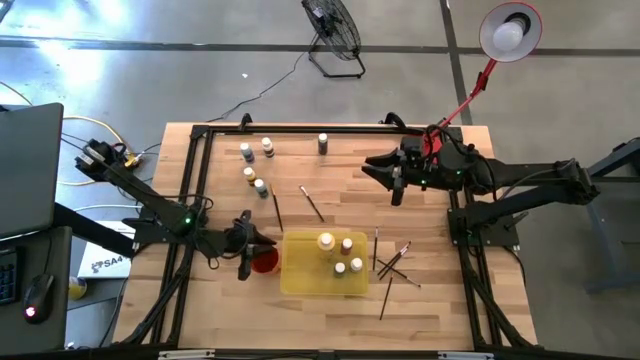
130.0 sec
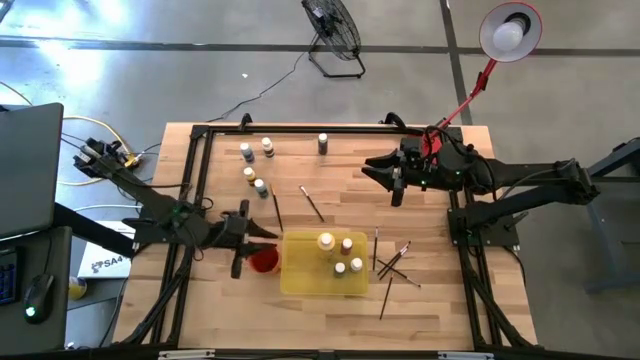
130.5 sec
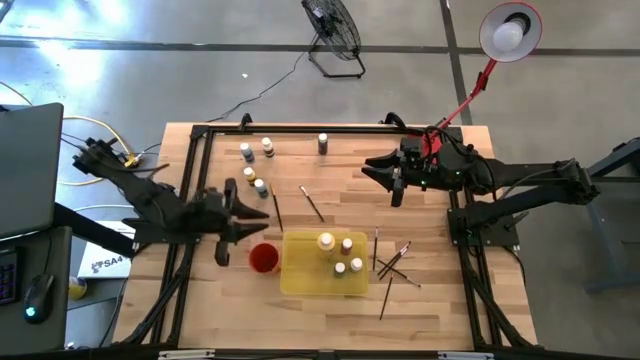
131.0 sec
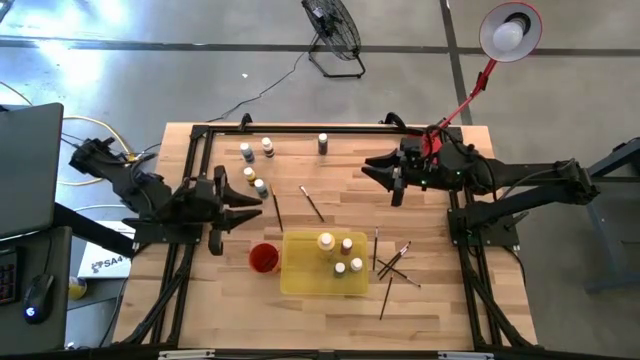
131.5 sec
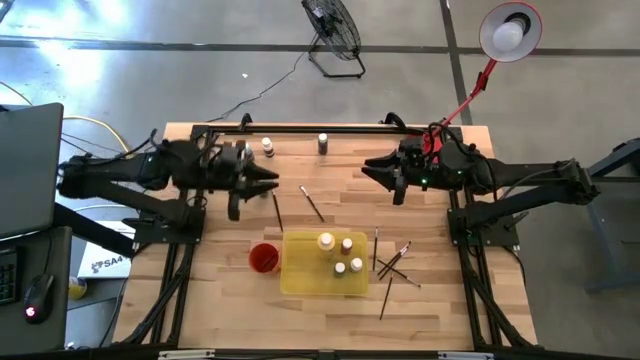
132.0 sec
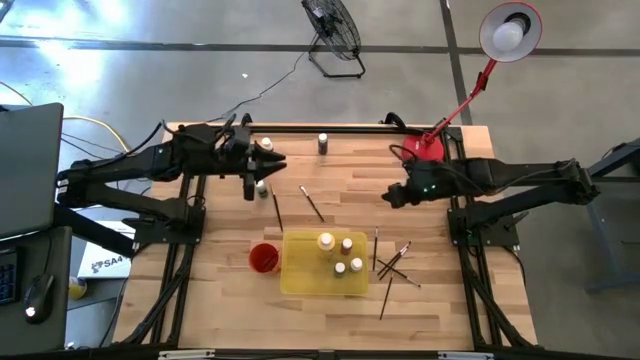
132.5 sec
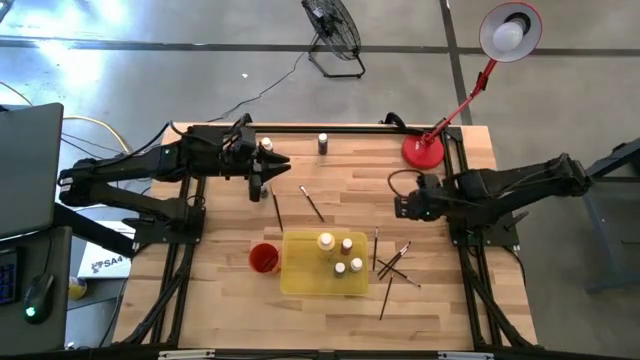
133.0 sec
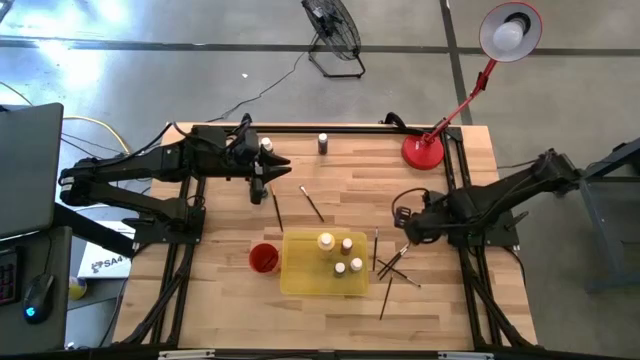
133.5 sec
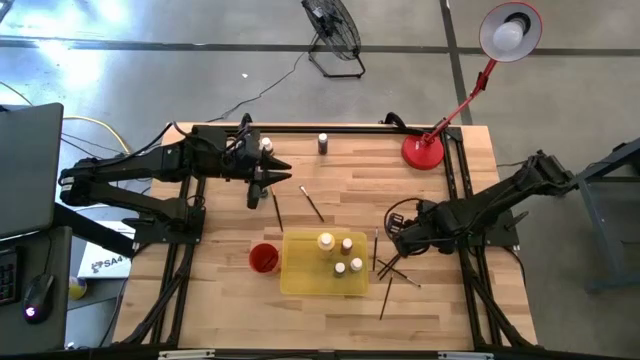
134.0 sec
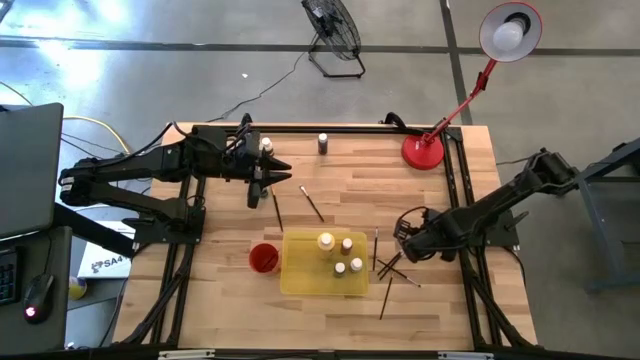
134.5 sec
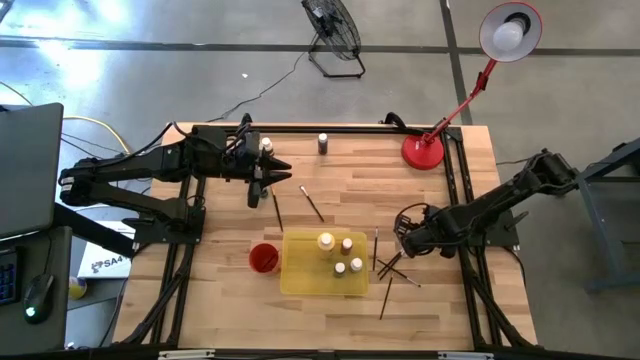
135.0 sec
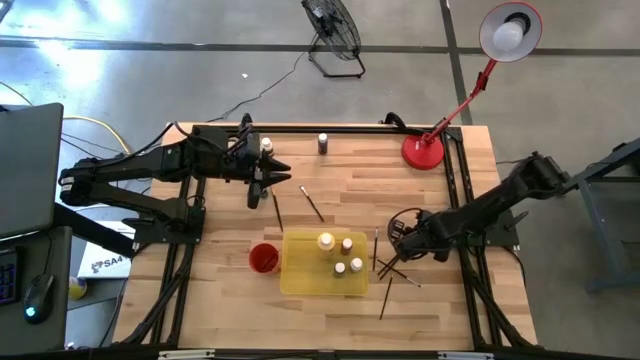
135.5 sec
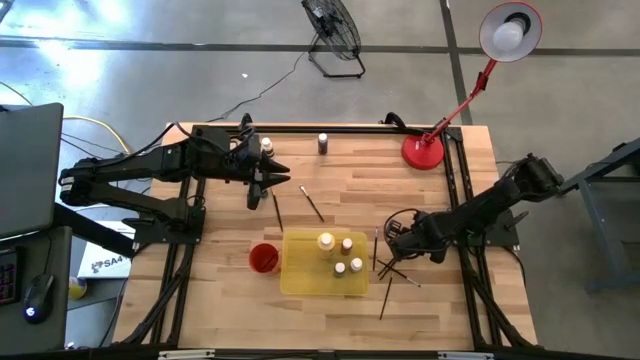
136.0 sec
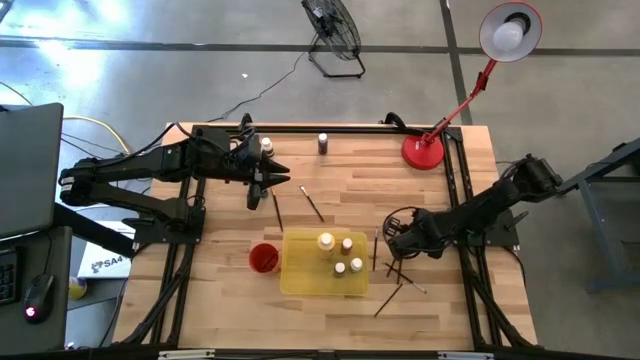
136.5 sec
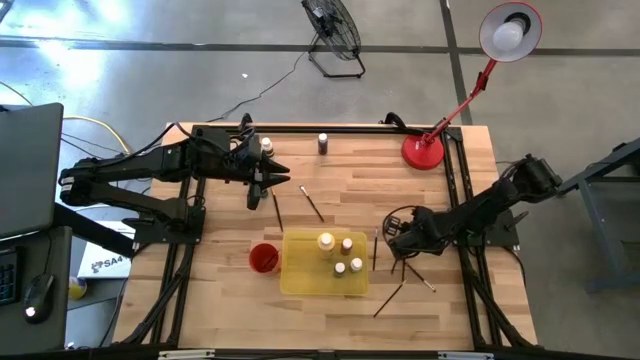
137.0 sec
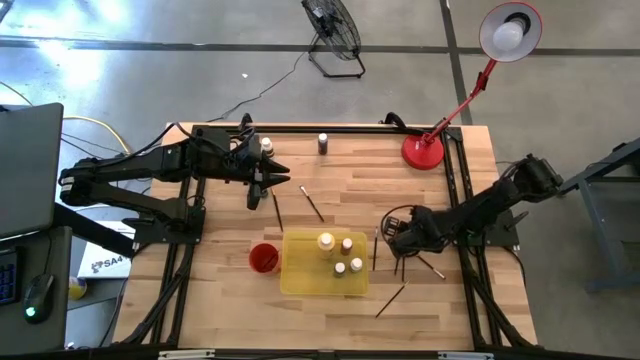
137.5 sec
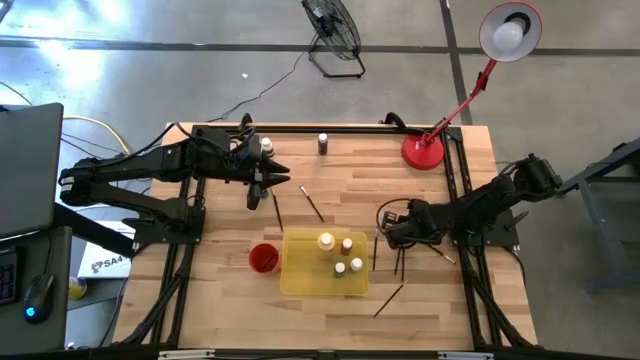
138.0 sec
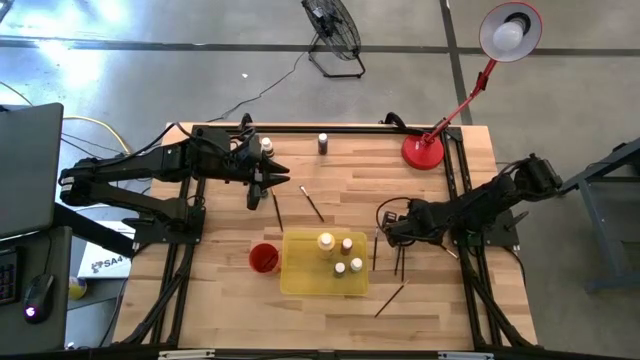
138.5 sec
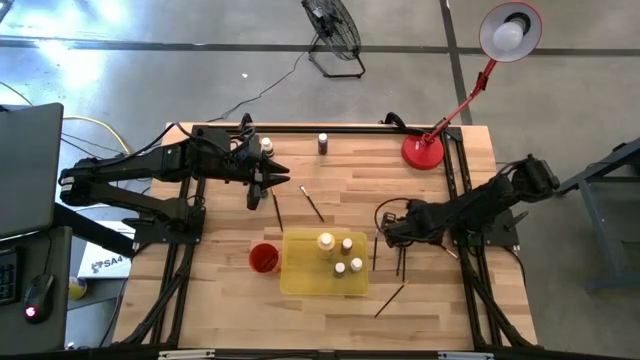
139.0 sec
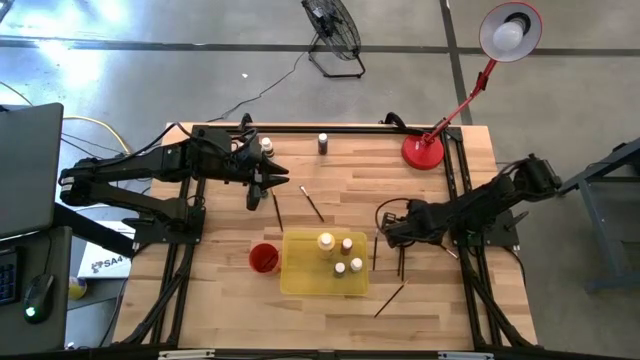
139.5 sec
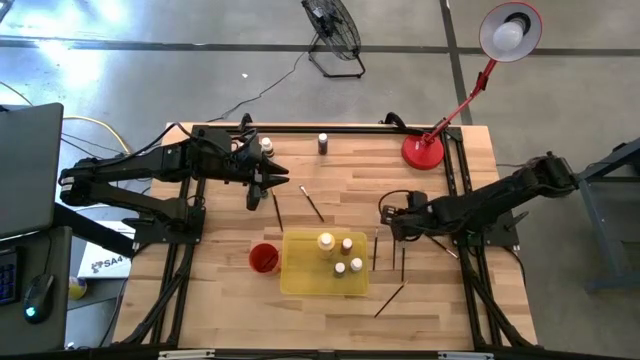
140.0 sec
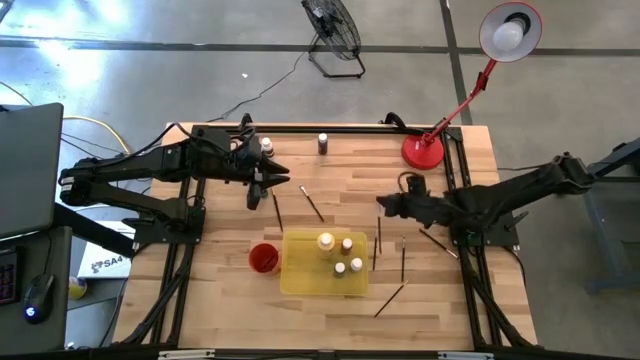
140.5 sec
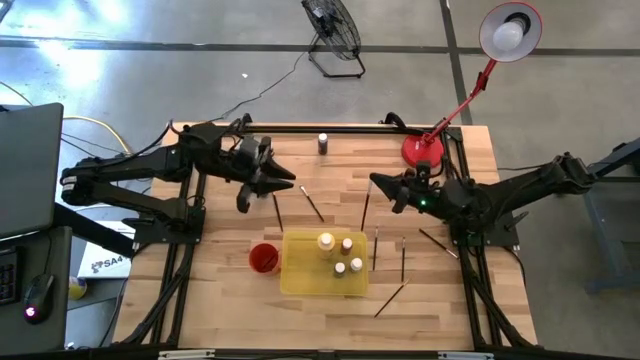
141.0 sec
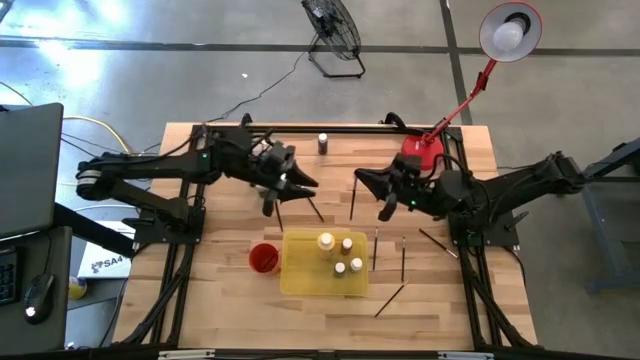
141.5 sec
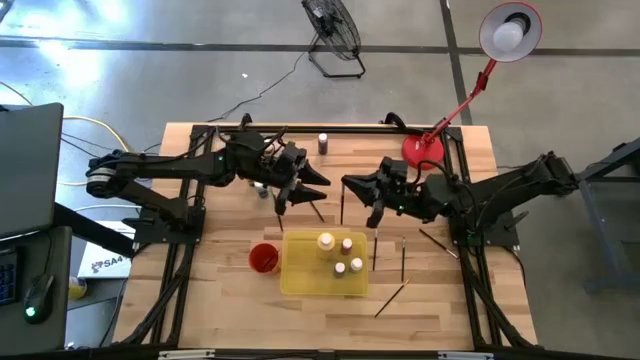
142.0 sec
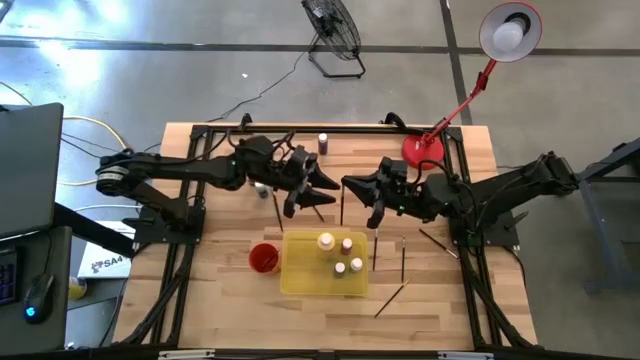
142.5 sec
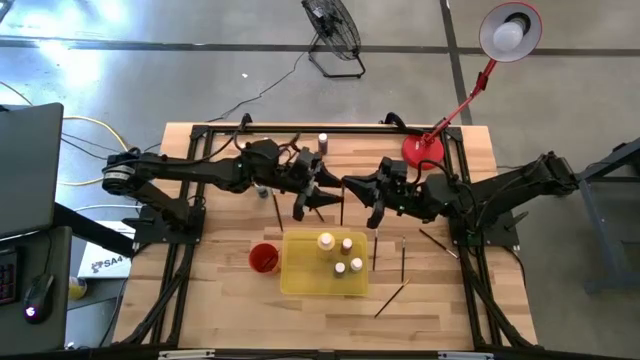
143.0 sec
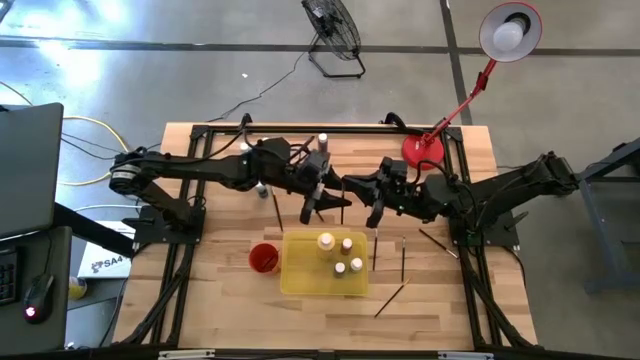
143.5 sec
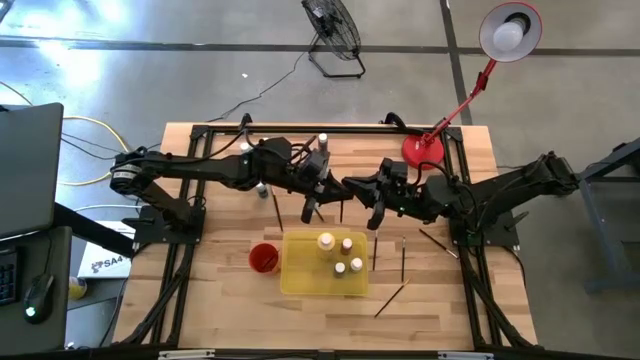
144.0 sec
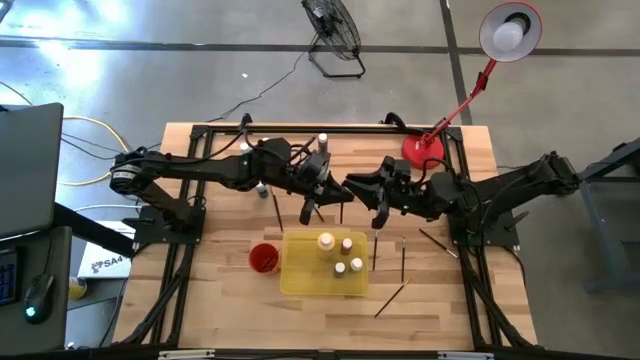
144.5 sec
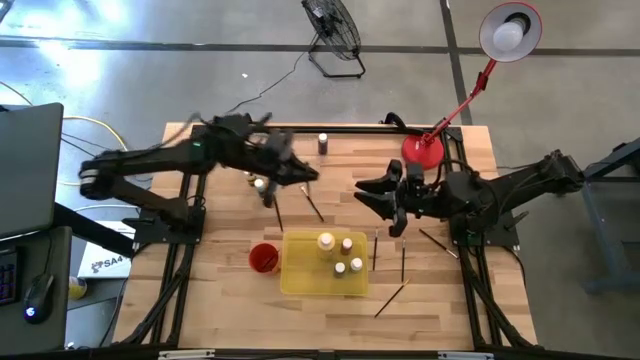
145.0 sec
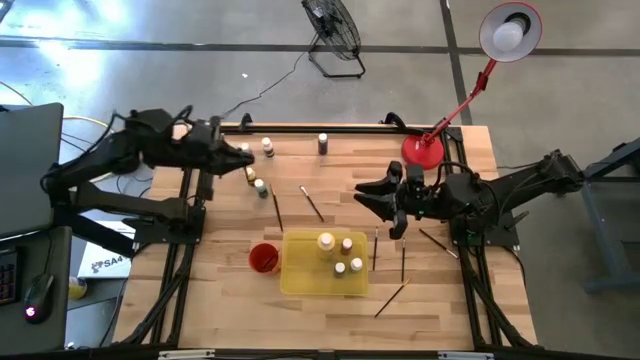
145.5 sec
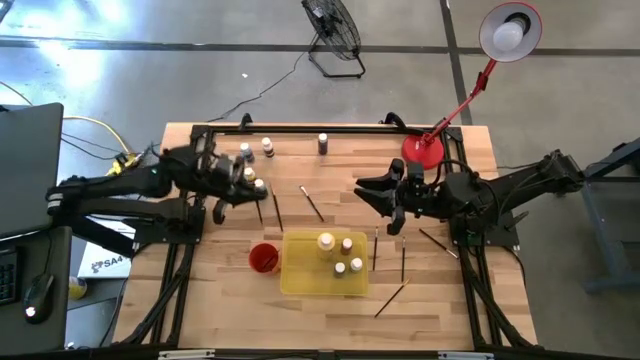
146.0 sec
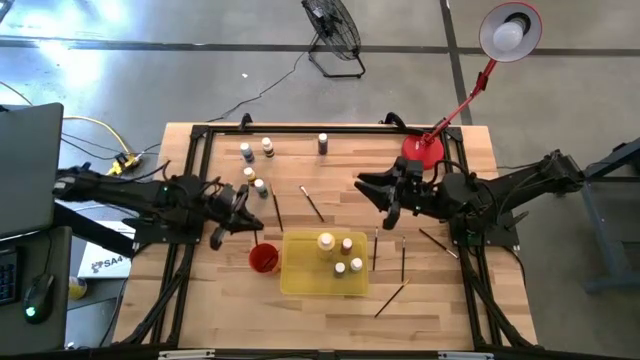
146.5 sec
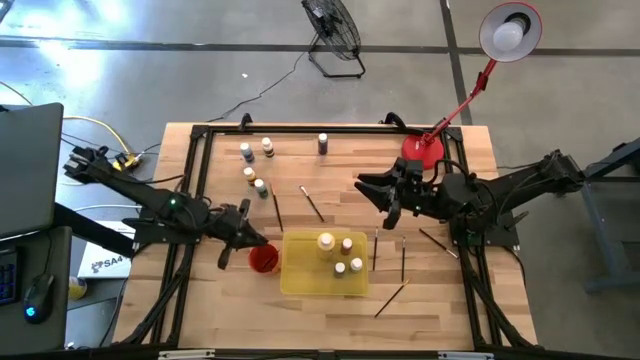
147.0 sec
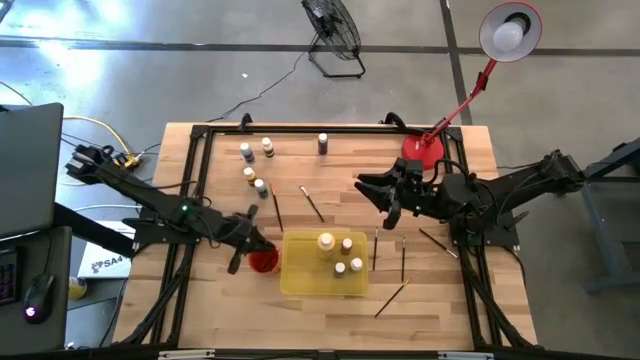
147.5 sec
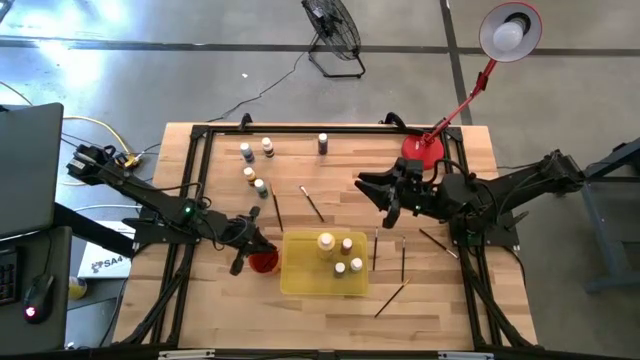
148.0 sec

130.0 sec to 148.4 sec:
Task: Pick & Place Paint Supplies
Put the silver paintbrush into the orange cup

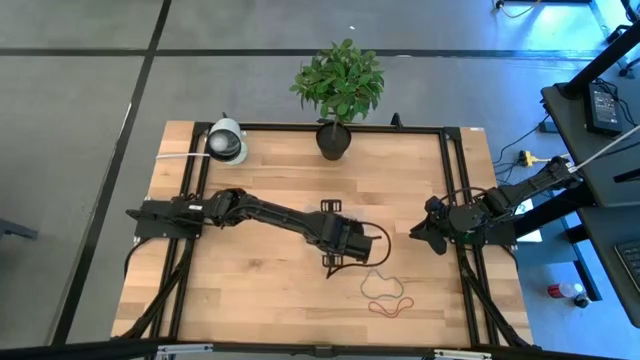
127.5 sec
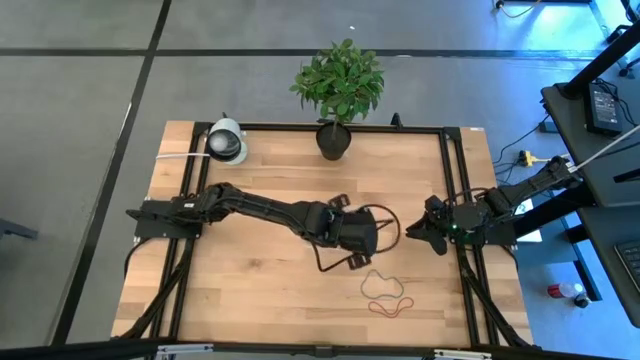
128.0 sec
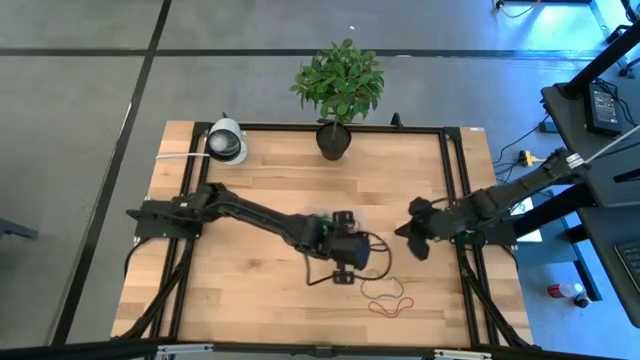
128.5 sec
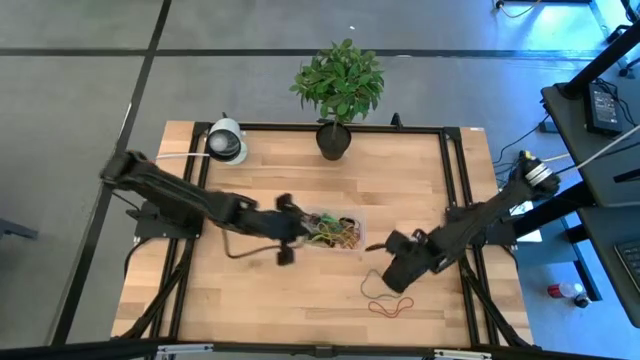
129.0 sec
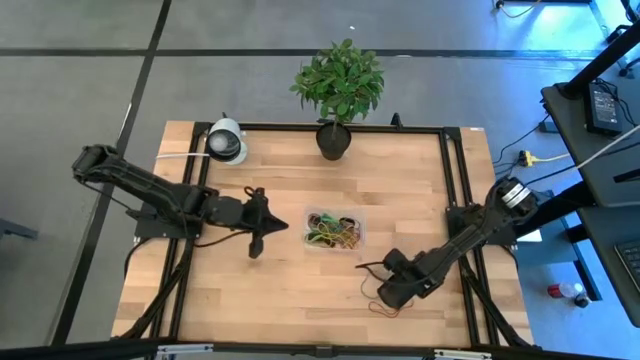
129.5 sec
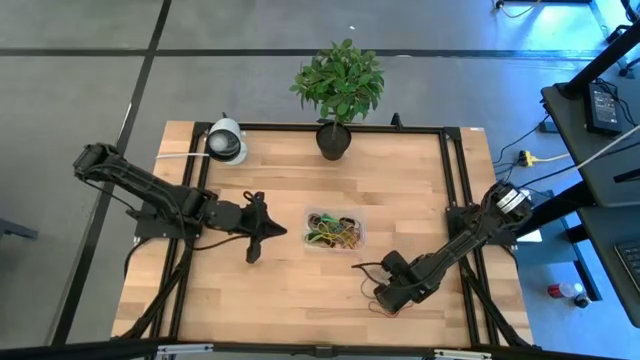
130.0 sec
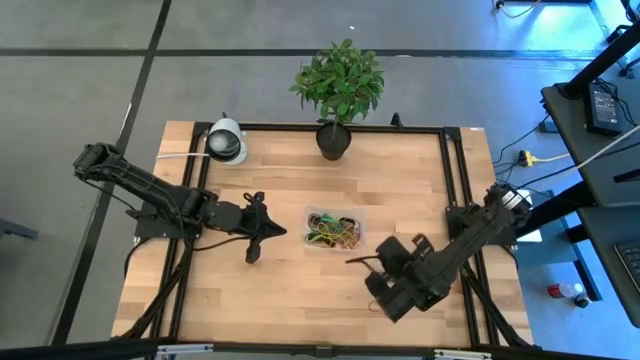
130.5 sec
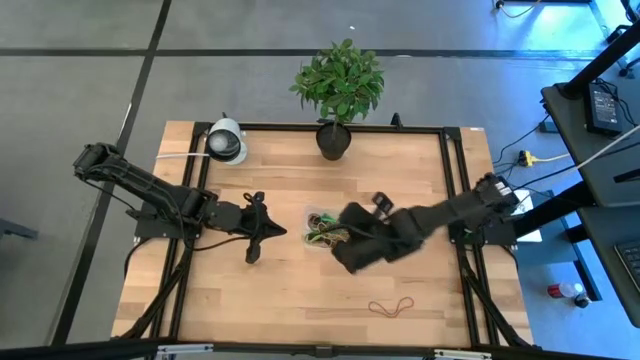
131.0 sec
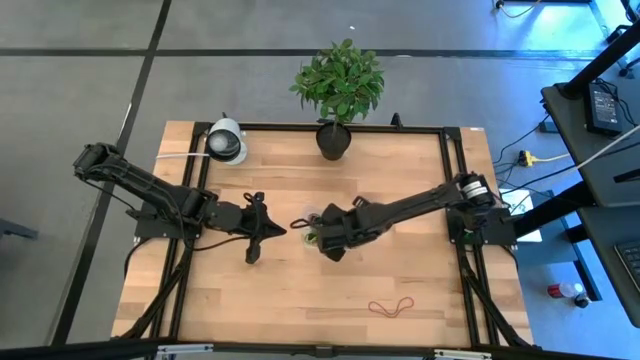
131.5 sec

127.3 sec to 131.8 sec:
Task: Pick and place rubber bands into bin
Put the blue rubber band into the bin
